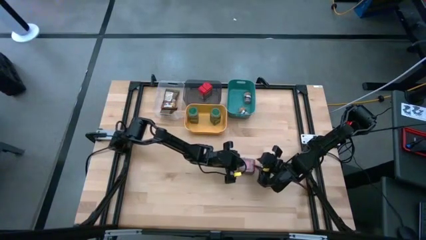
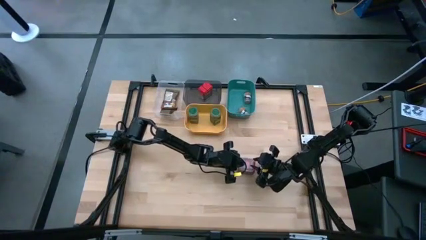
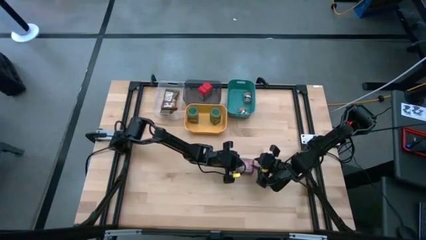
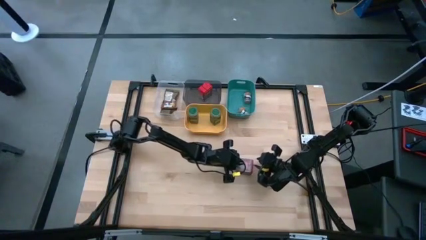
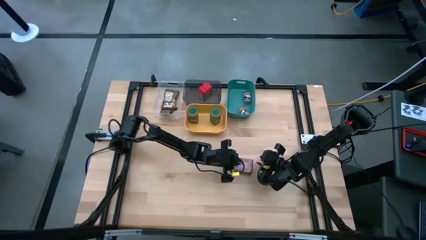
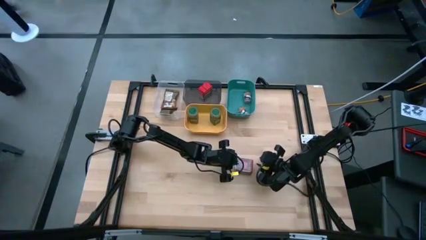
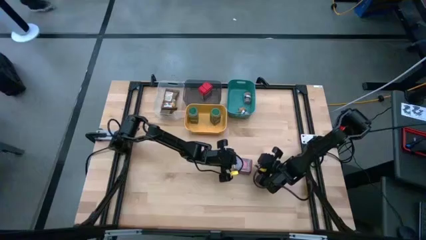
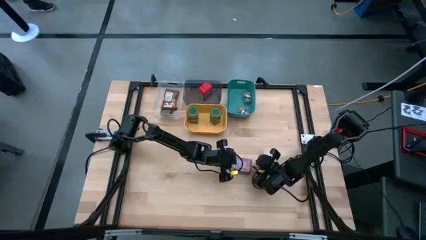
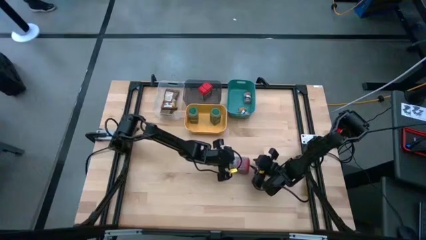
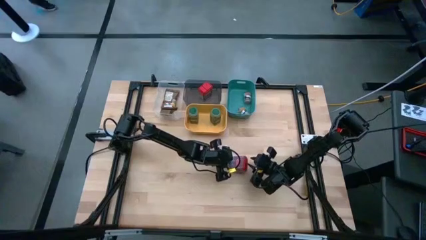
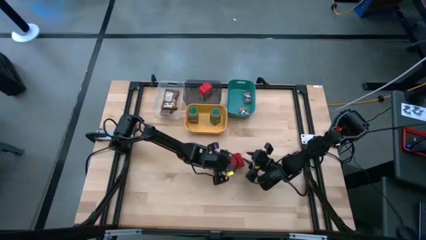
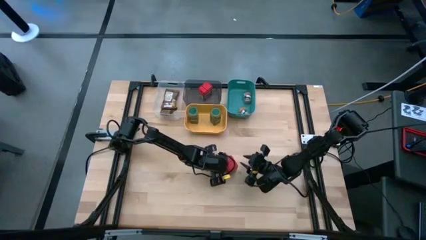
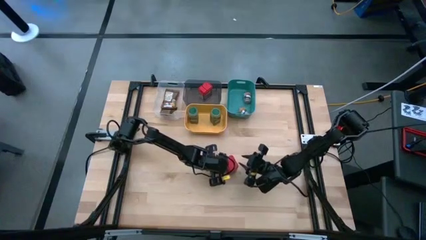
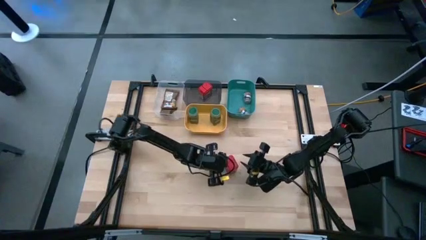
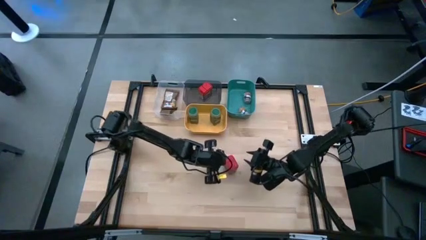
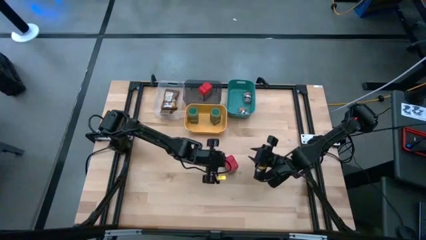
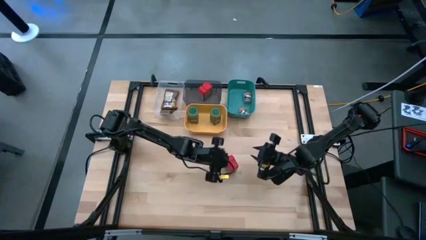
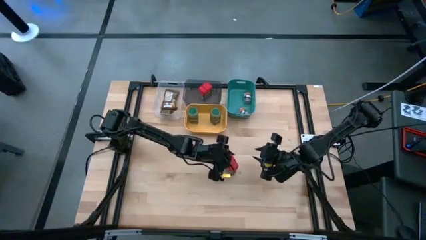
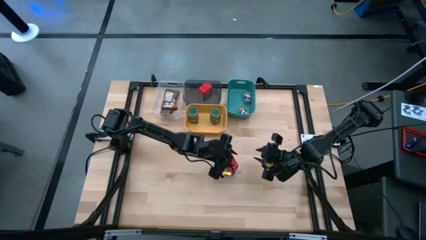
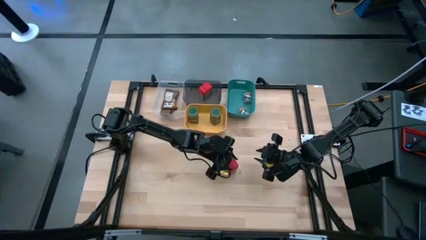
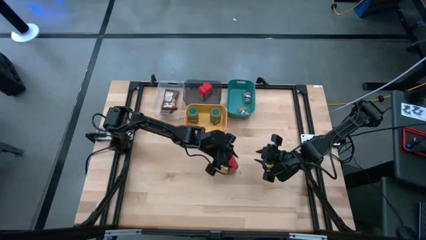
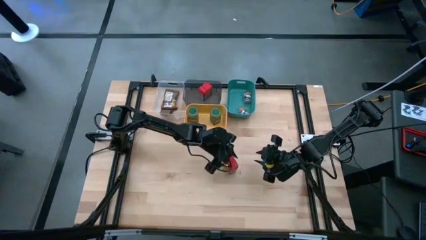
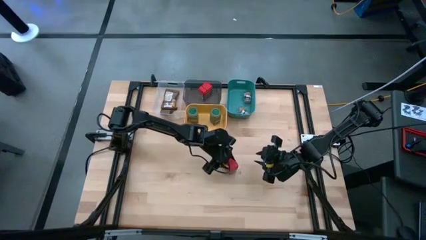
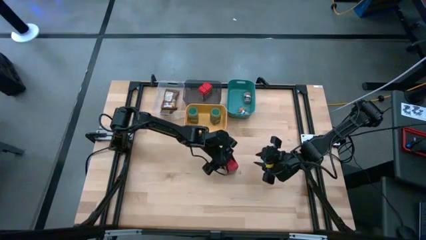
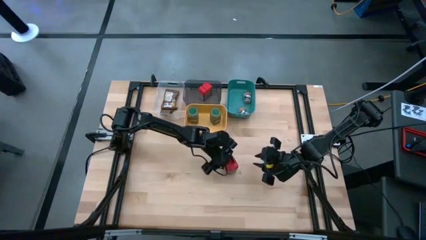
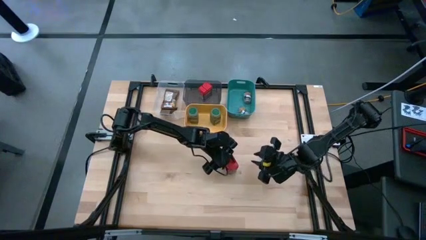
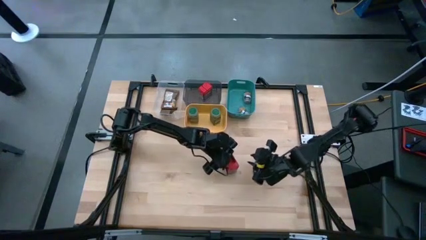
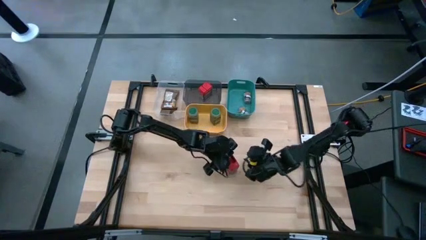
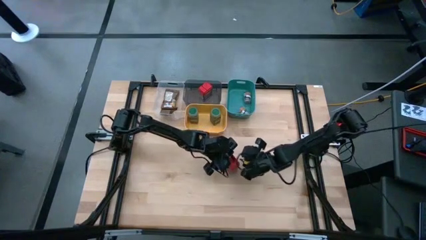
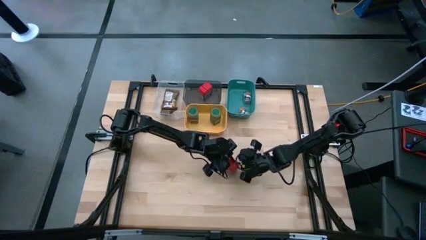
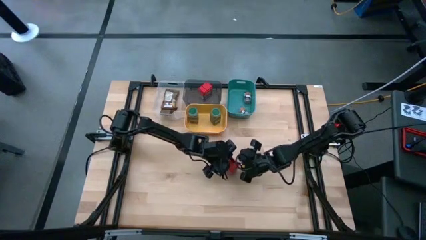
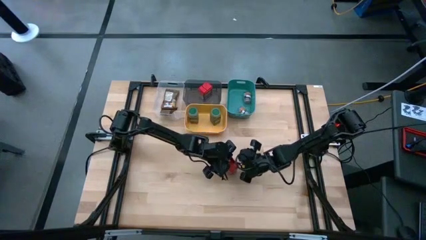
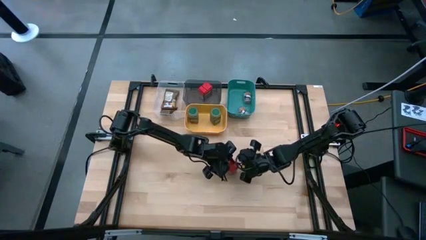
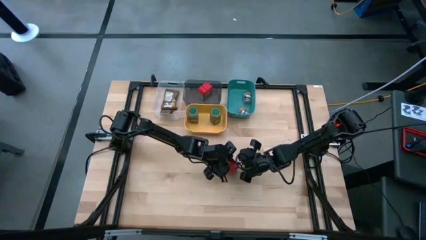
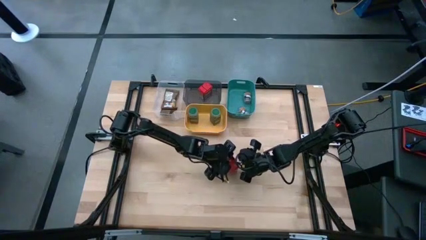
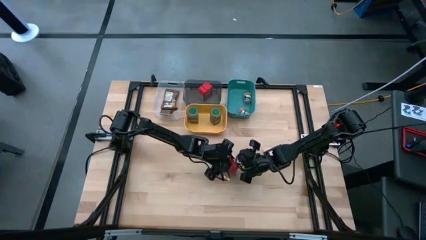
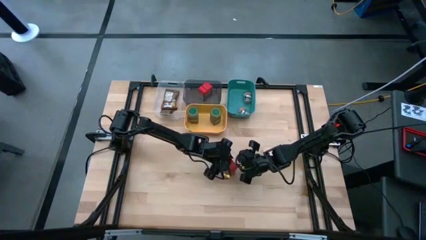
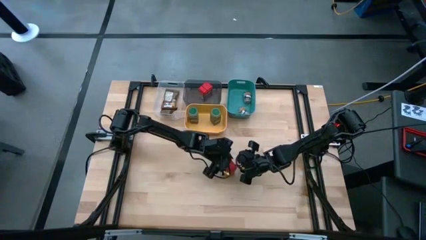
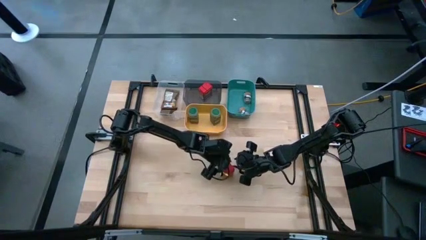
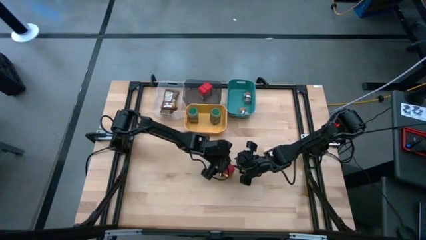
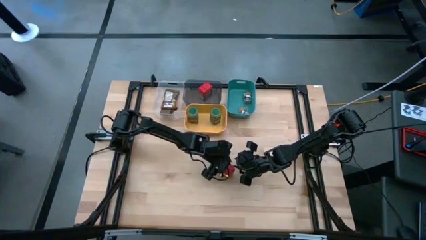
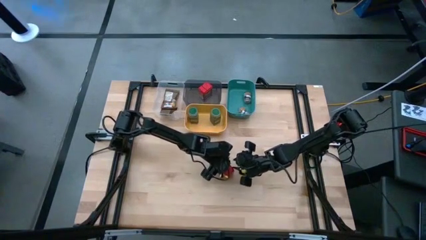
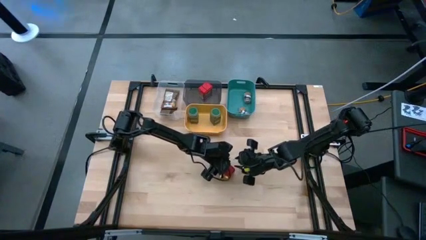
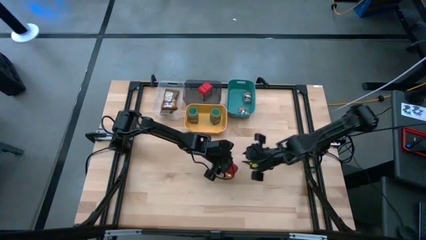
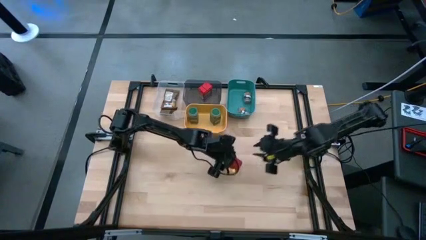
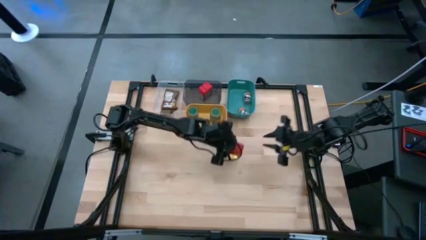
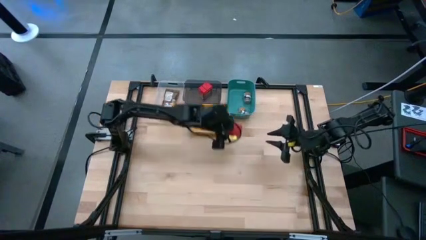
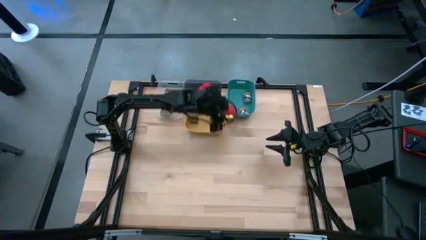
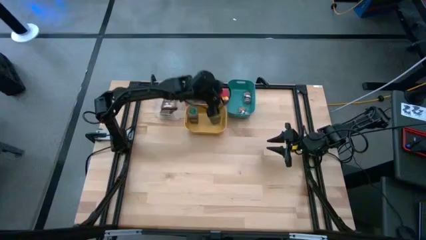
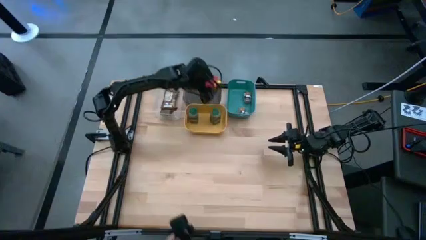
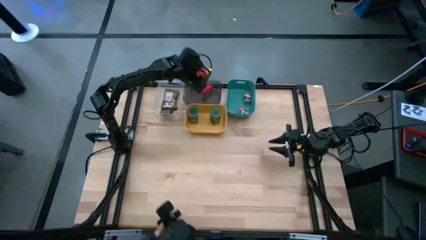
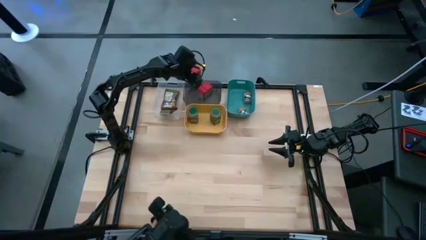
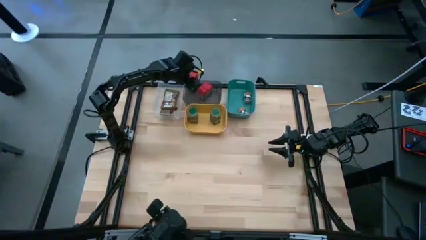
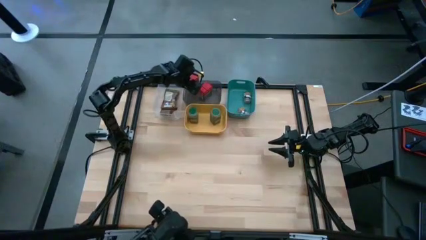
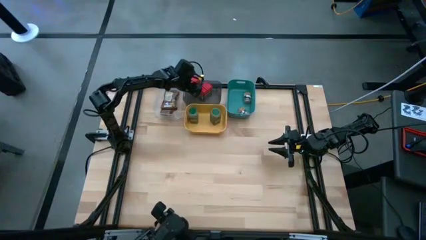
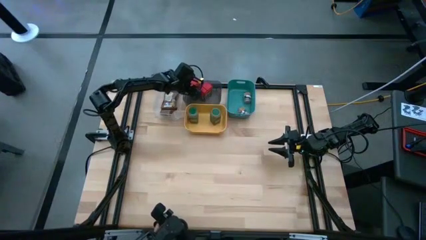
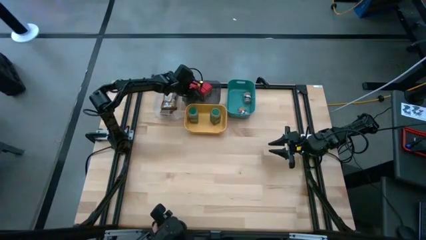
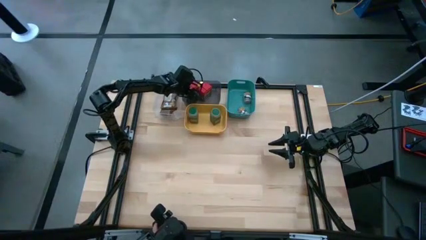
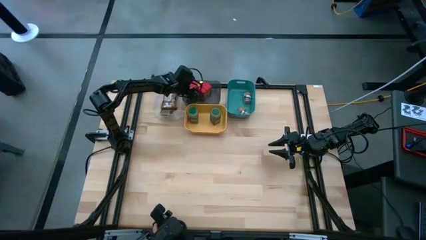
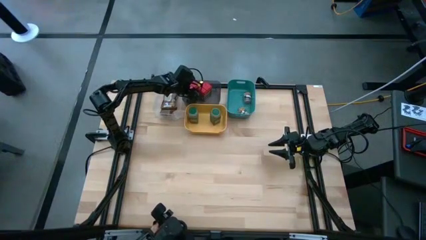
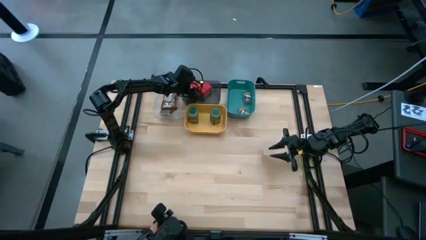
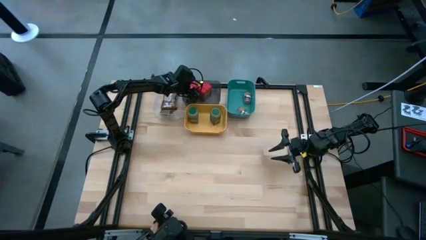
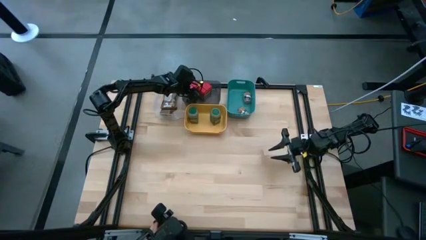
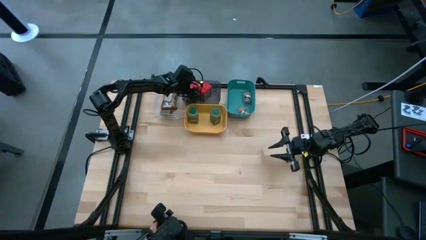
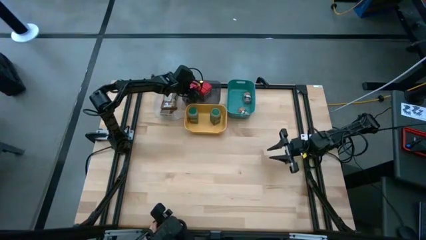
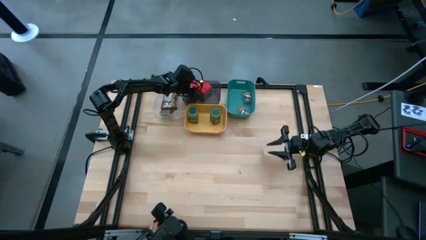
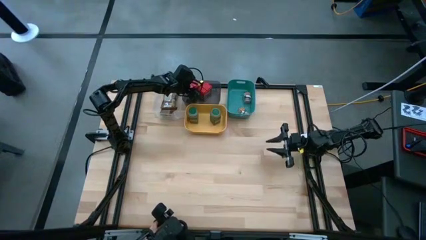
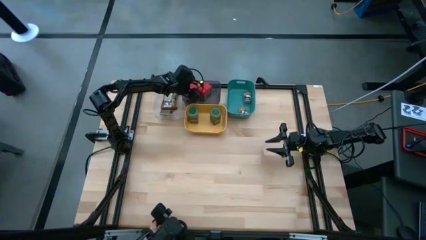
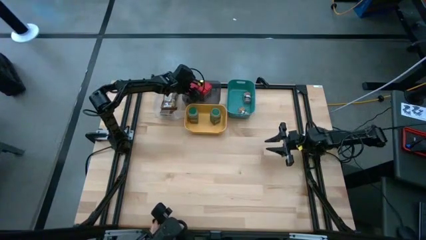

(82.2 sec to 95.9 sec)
Task: Sort spices by type
Put the red can into the black transparent bin

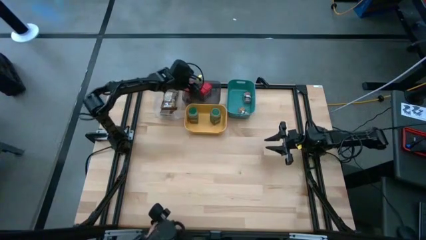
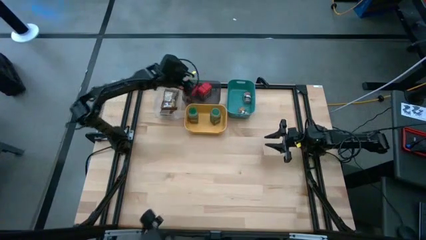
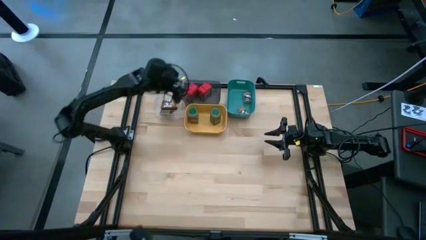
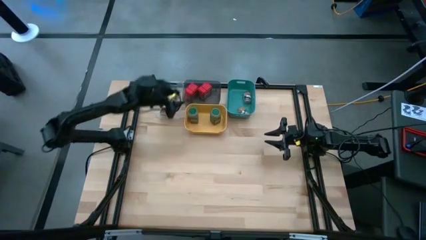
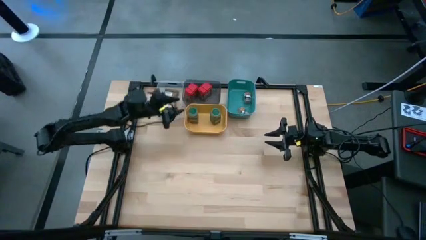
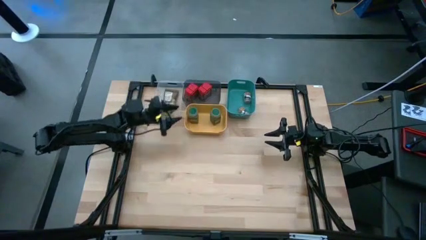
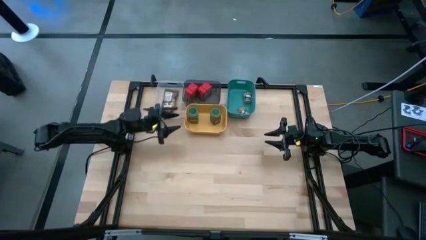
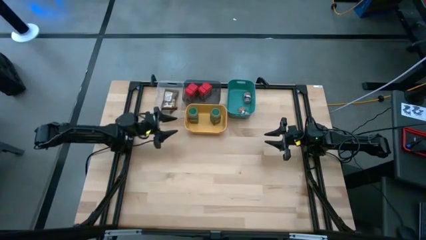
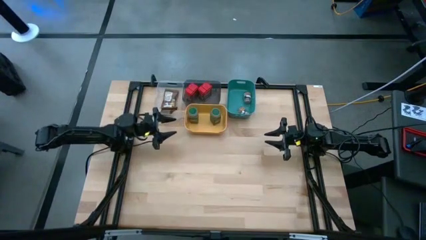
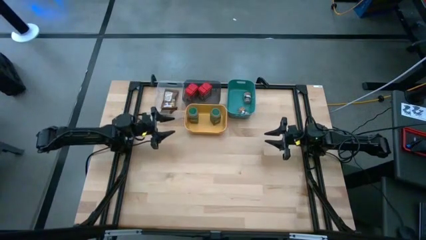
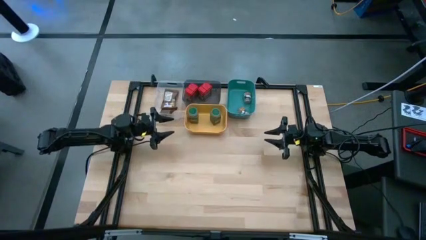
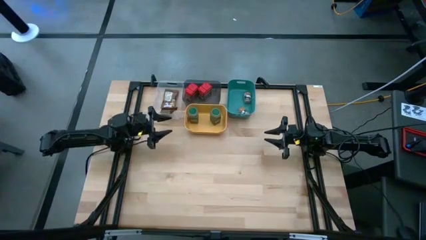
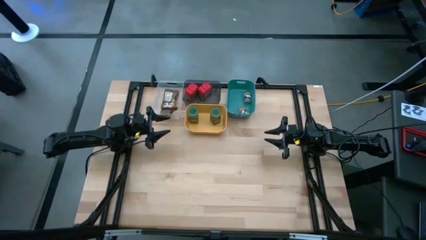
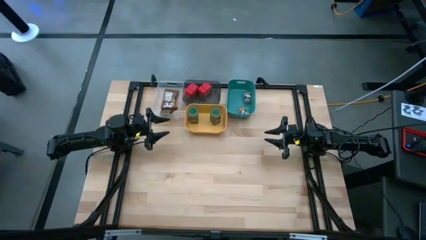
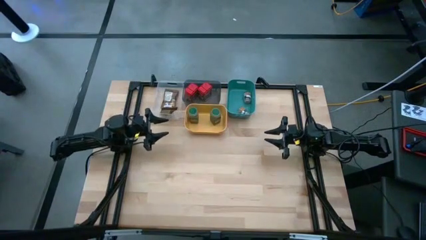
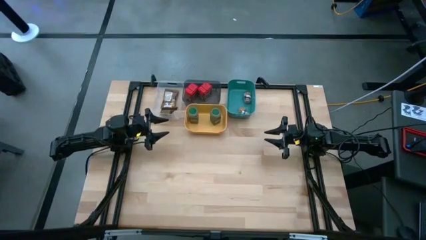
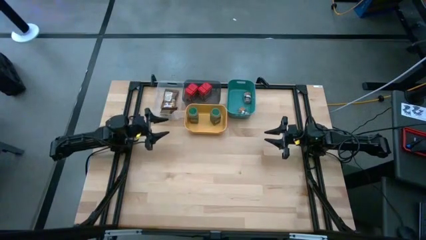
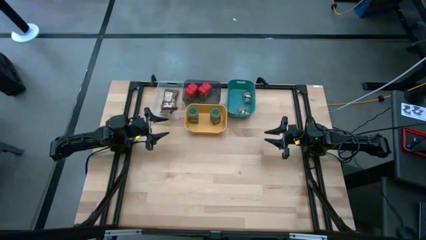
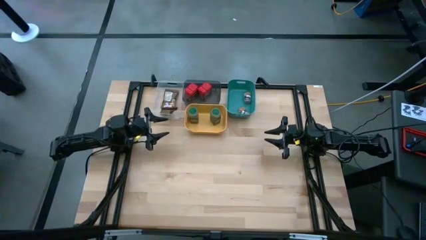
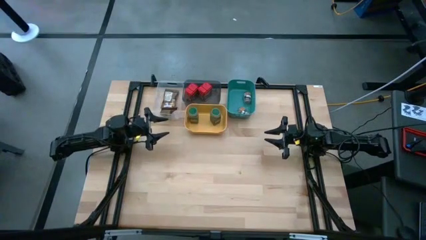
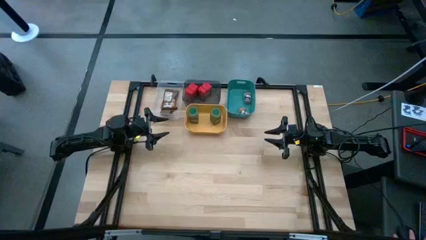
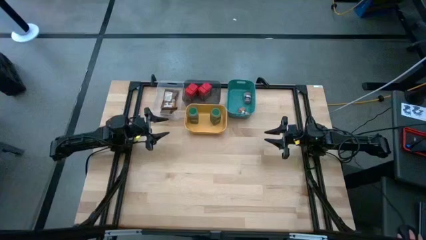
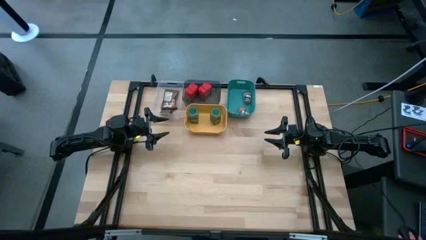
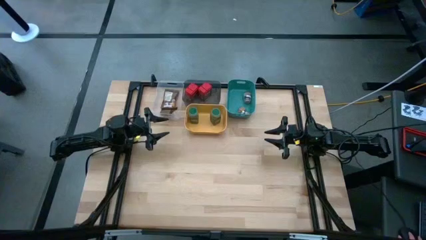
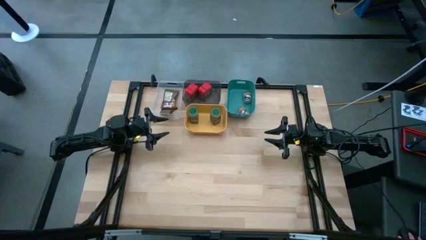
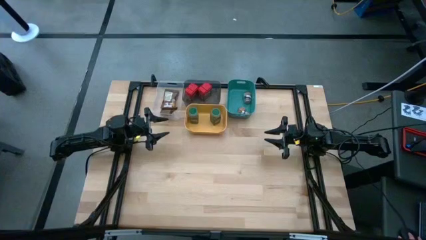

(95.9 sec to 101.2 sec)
Return to Home Position
